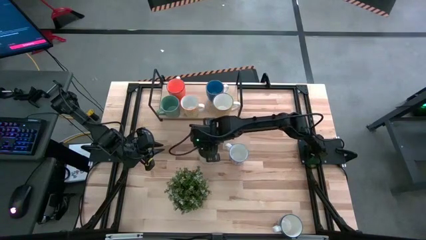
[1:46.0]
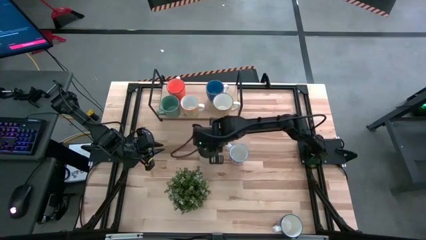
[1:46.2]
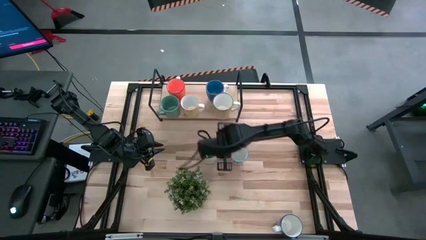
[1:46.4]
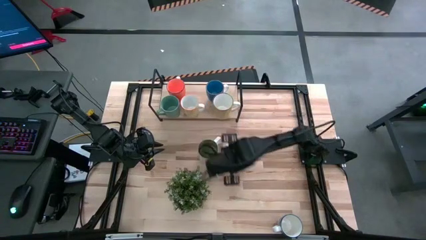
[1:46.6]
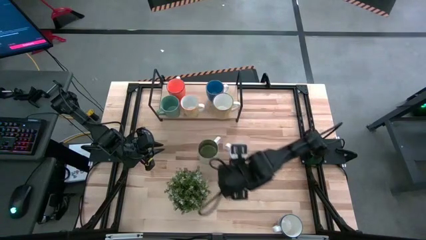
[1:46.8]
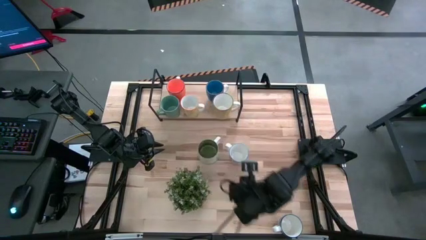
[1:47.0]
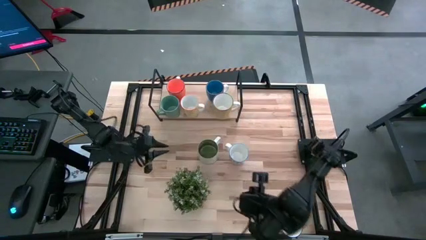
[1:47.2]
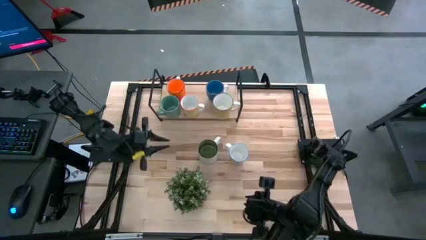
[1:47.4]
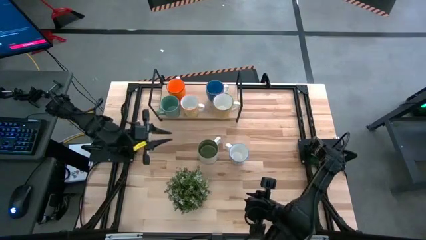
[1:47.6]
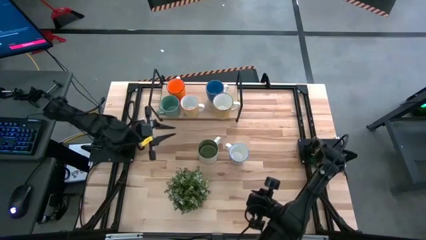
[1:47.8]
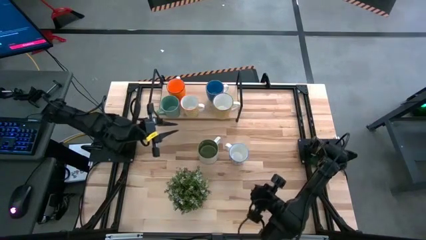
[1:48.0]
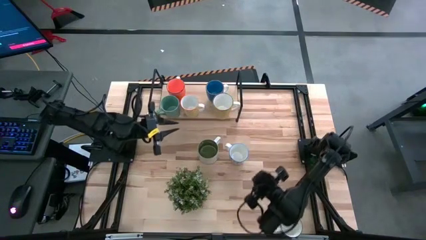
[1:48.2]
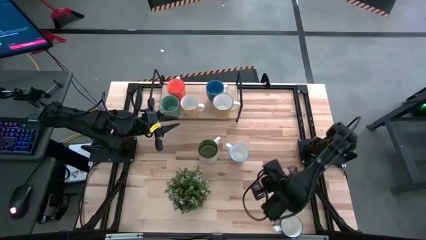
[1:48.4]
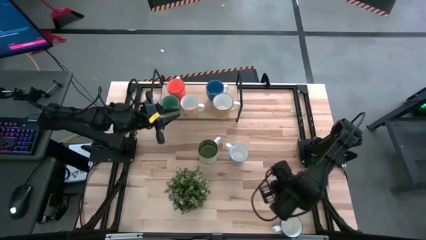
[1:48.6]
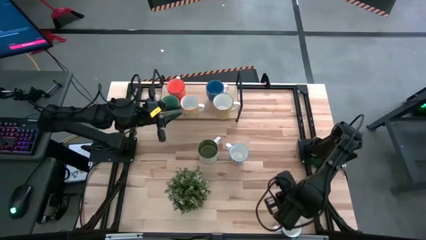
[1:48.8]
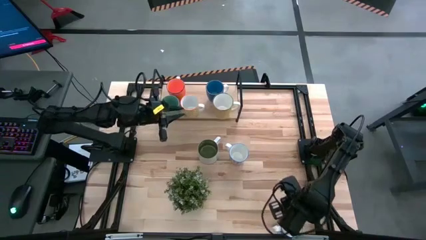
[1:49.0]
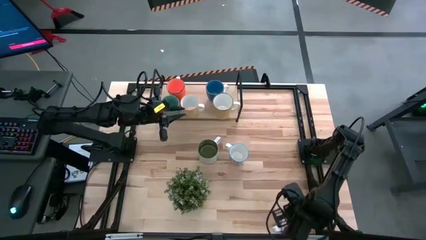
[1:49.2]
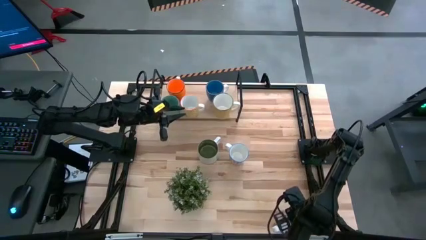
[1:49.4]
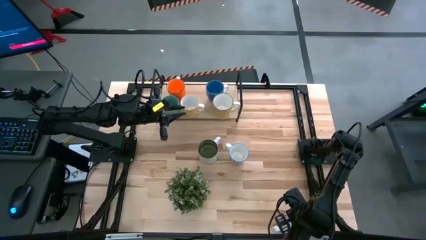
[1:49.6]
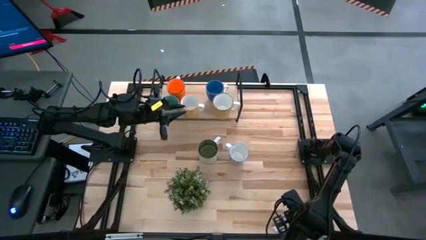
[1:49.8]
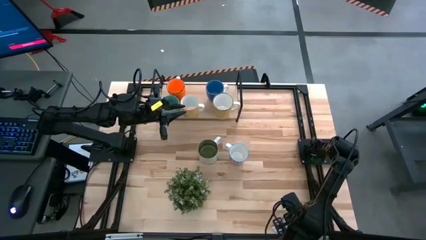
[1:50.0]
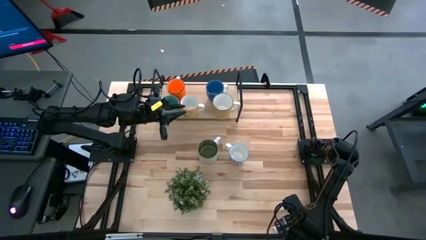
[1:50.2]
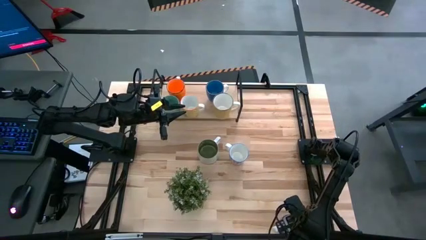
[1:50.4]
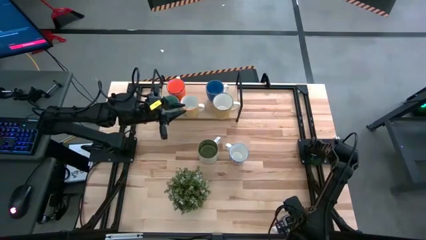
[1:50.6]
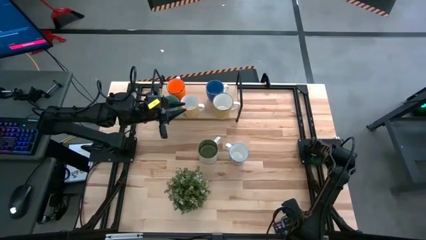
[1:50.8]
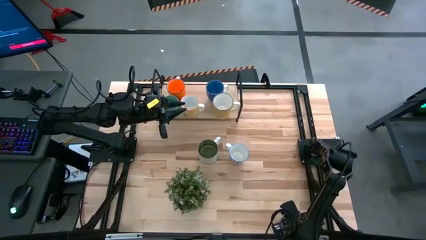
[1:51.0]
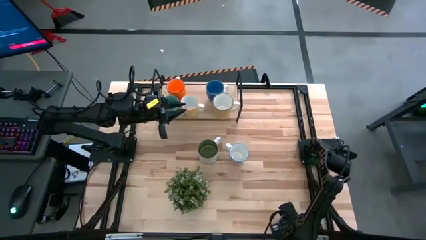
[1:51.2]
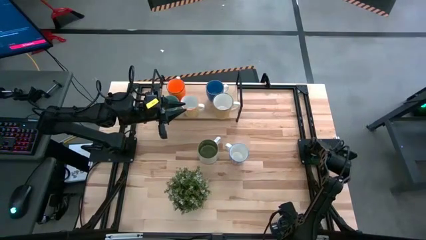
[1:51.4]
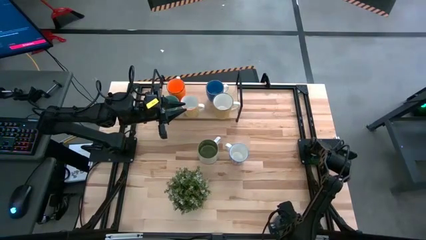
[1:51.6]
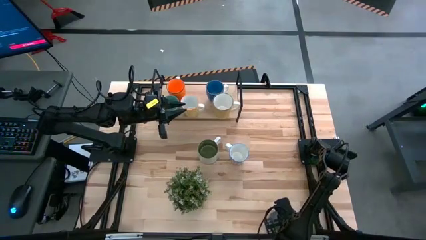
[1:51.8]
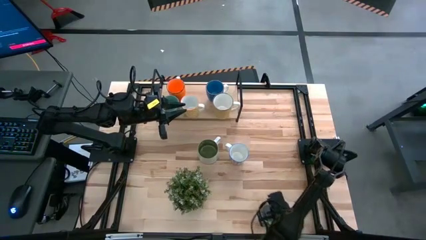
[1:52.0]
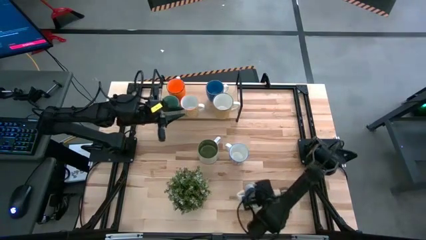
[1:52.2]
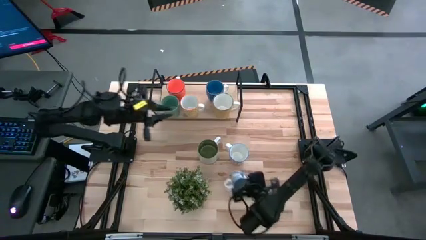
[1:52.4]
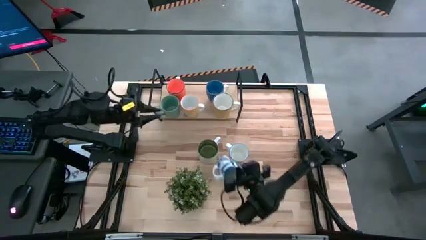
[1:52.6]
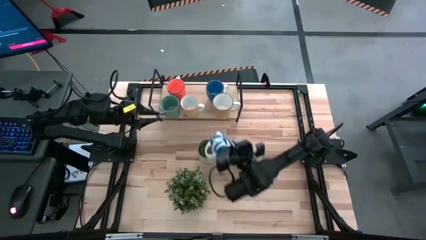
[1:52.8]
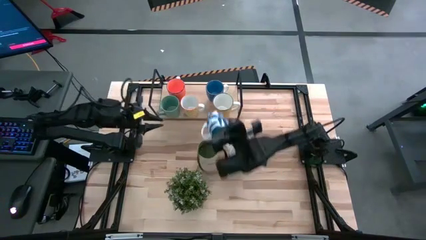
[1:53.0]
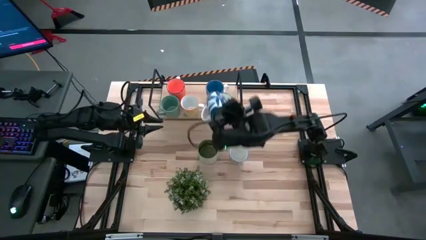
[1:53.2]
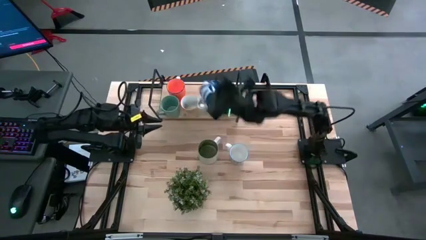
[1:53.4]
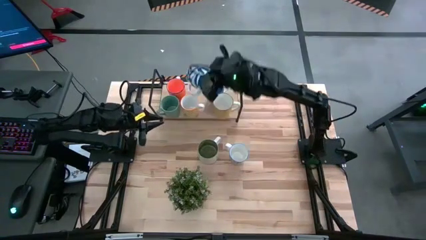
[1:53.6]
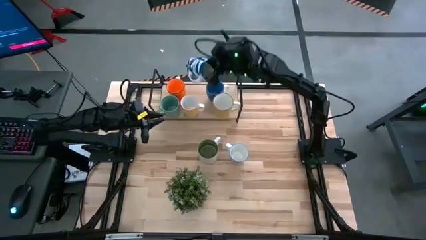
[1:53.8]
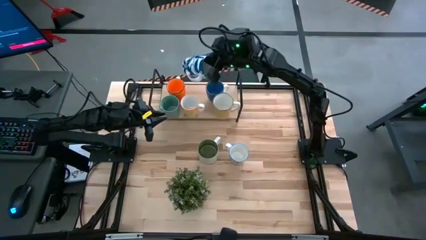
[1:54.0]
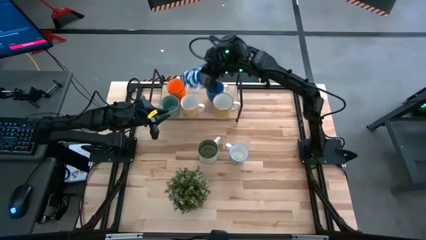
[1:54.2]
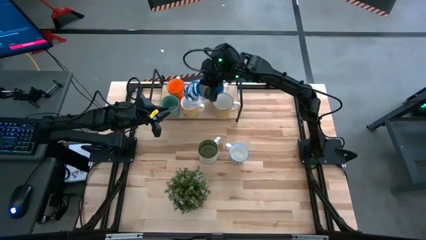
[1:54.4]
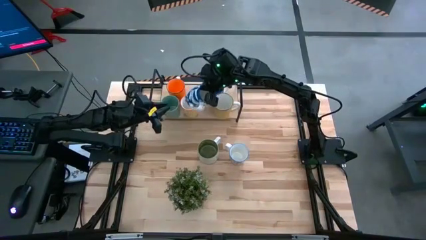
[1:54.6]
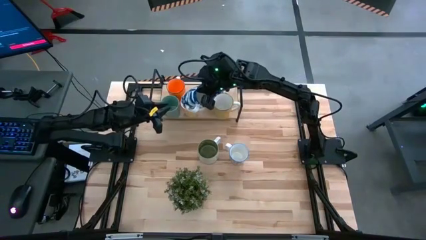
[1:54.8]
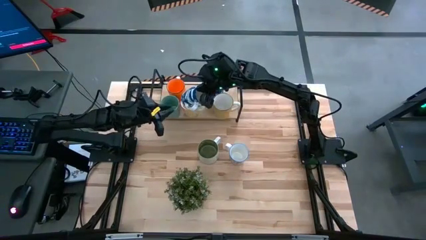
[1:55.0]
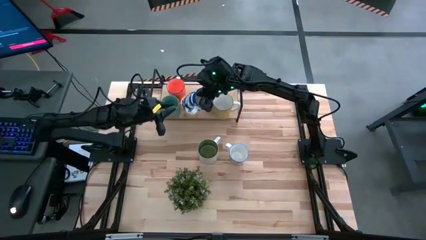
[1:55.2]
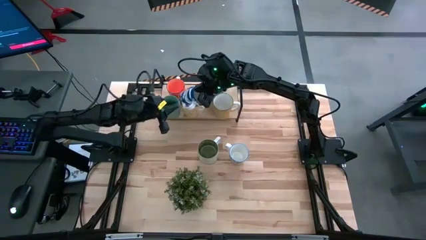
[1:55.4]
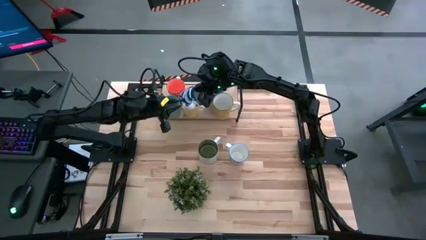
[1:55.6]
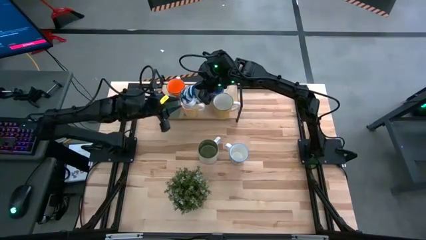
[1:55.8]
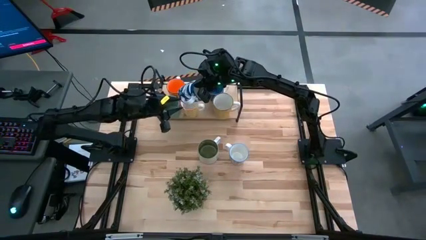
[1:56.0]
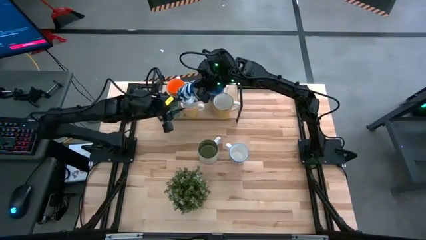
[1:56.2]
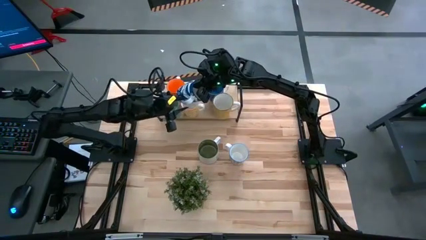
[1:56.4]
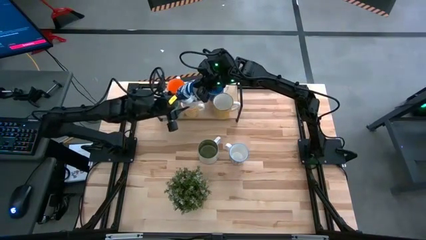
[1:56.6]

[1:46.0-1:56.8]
Task: Place coffee mugs
Move the blue patterned mug to the middle left of the table
